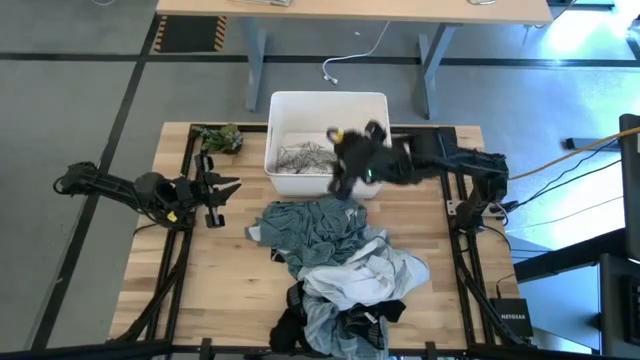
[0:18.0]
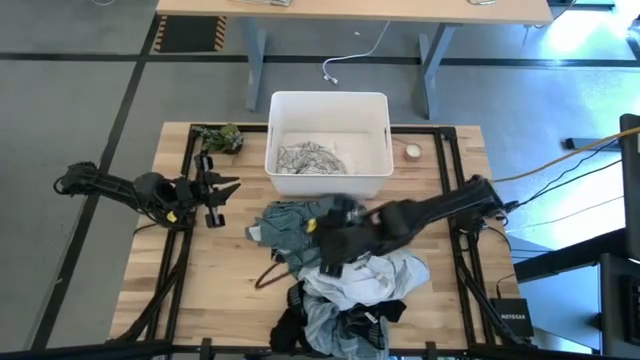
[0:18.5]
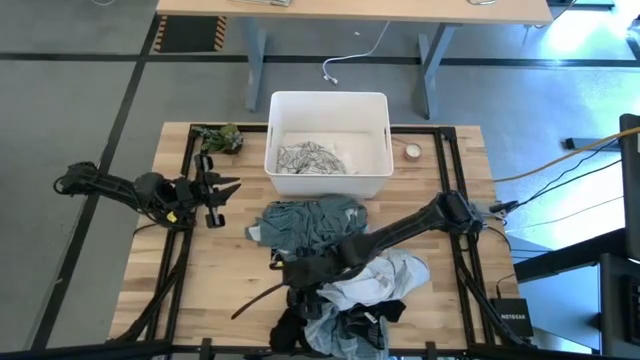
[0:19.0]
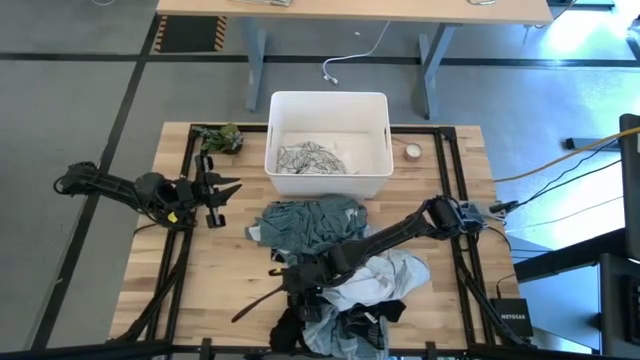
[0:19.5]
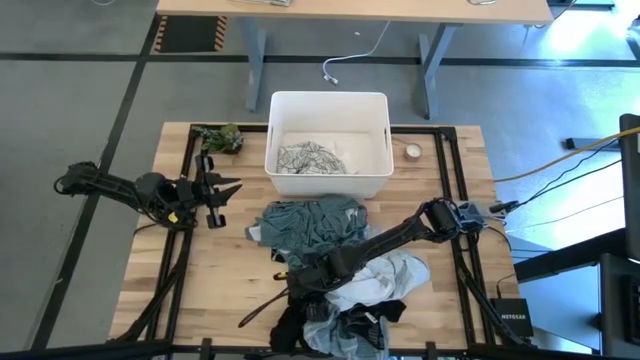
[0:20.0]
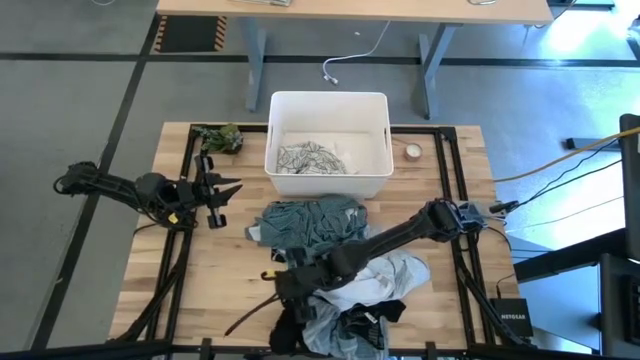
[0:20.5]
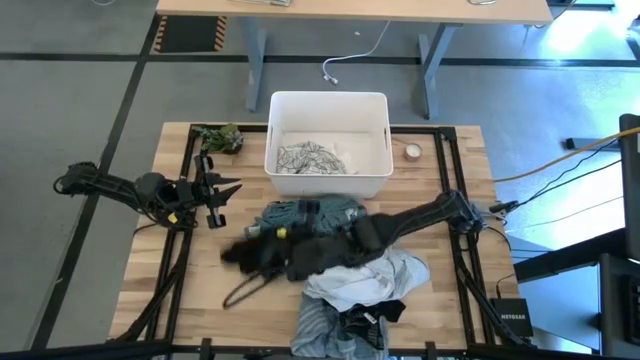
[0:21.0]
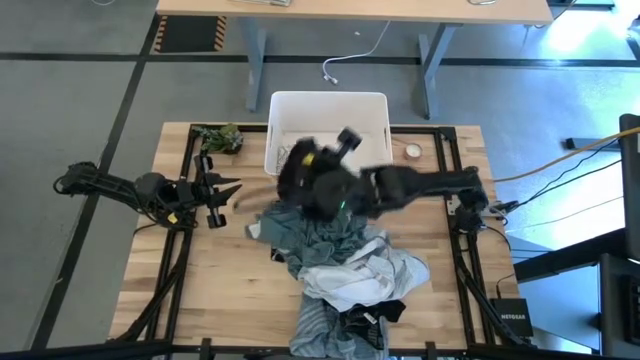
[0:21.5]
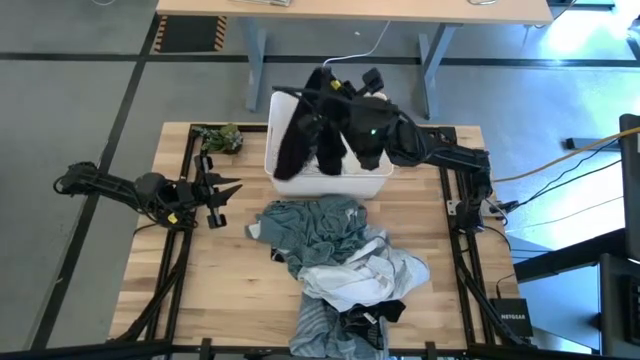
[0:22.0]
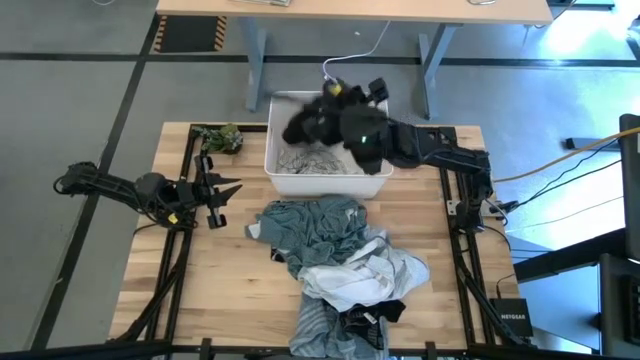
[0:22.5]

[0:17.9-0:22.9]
Task: Sort clothes
Put the black boxer into the white laundry bin

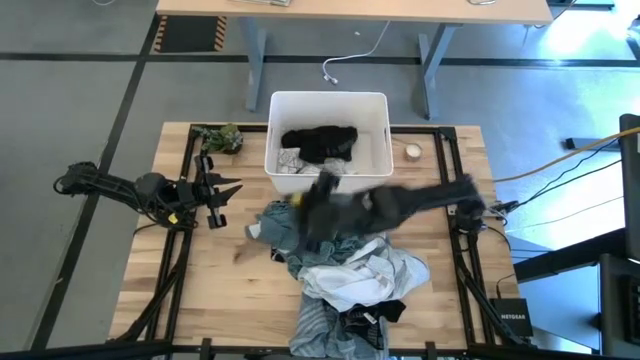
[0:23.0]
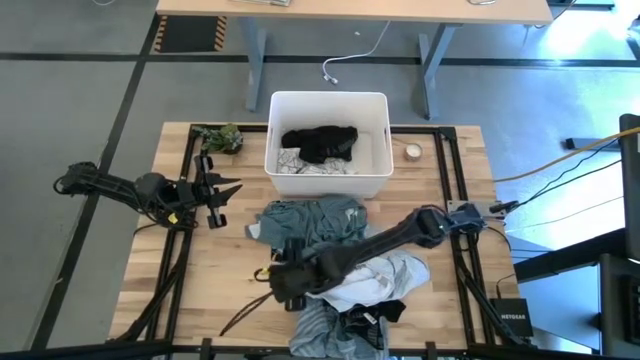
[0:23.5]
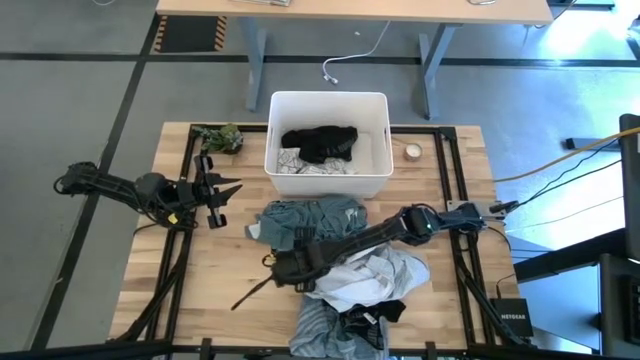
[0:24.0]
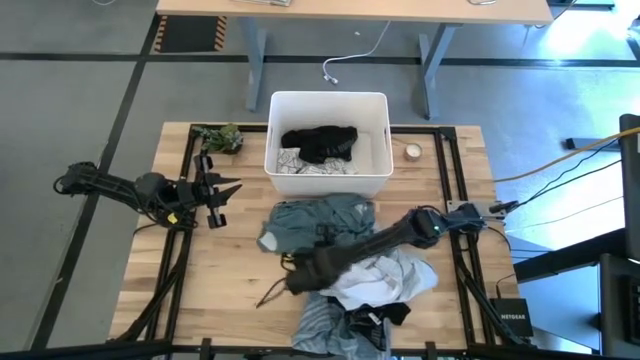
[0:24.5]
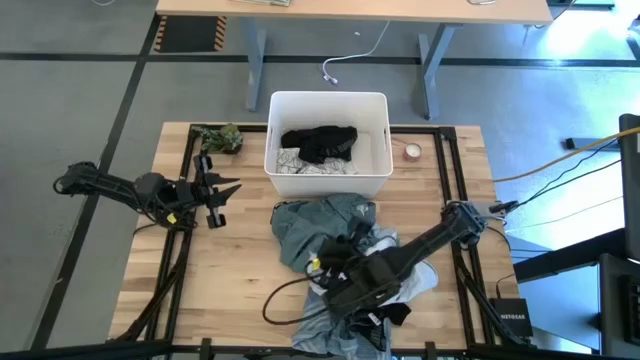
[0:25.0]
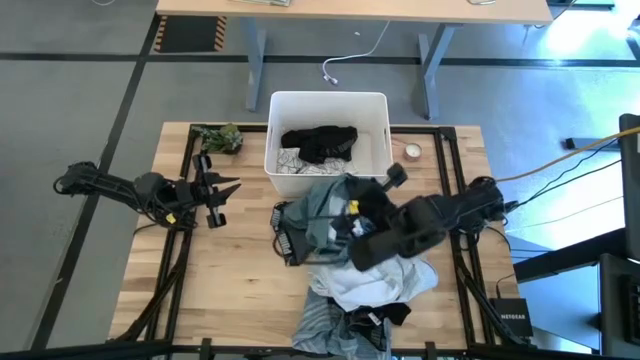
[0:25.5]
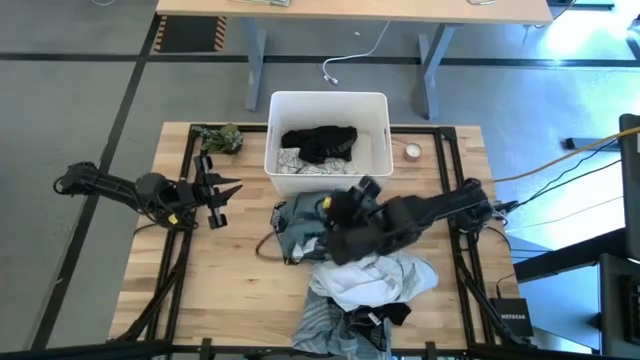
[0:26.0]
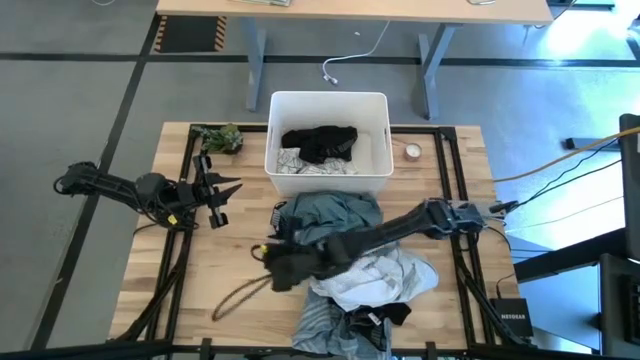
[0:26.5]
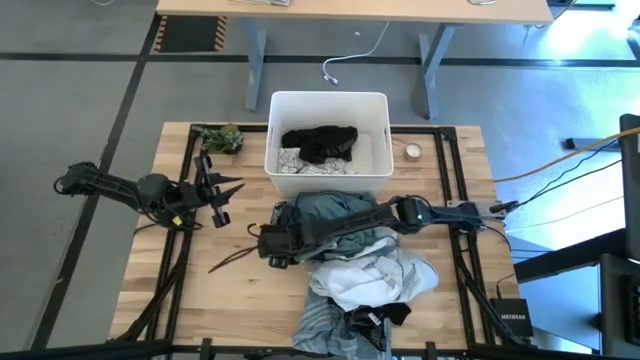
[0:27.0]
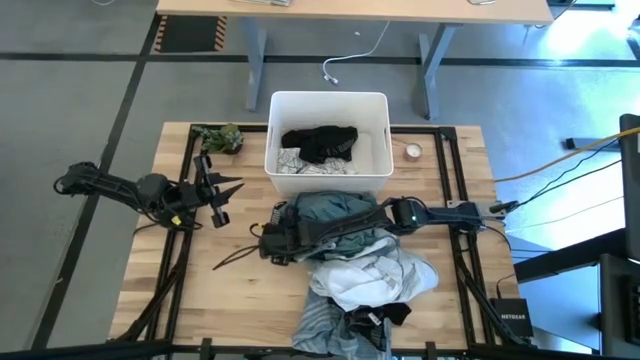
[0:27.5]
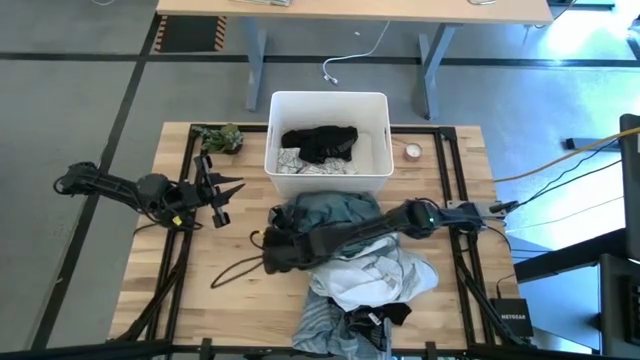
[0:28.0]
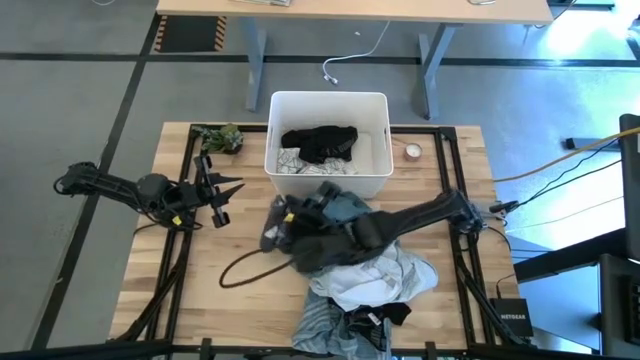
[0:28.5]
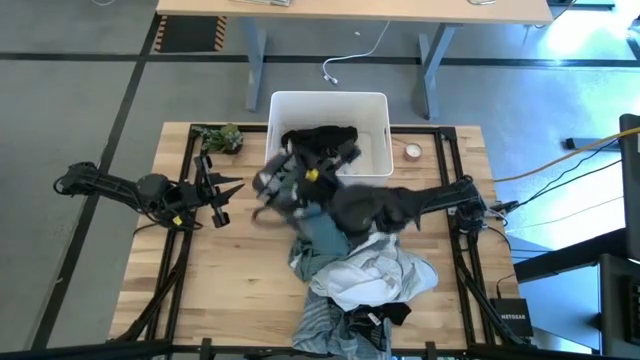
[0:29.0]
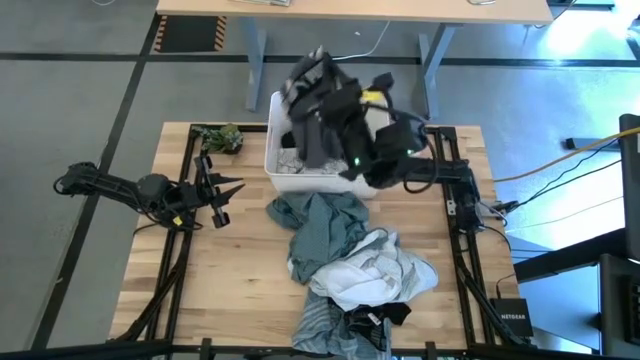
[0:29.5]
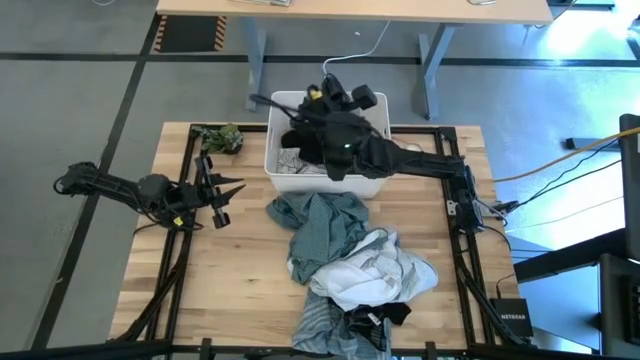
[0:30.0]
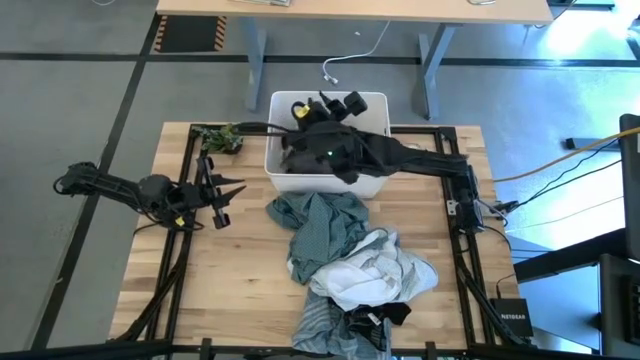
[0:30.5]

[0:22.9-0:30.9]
Put the dark gray boxer into the white laundry bin

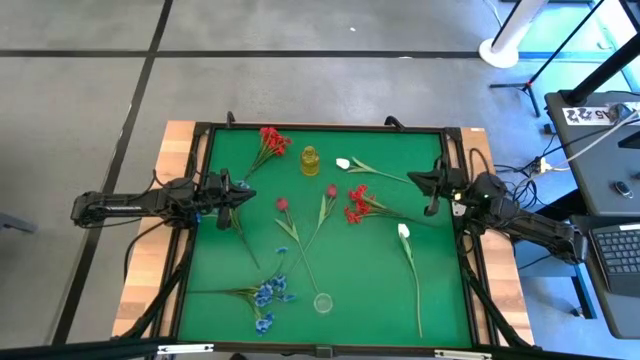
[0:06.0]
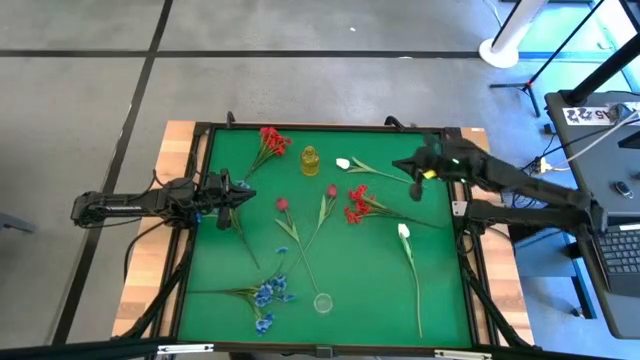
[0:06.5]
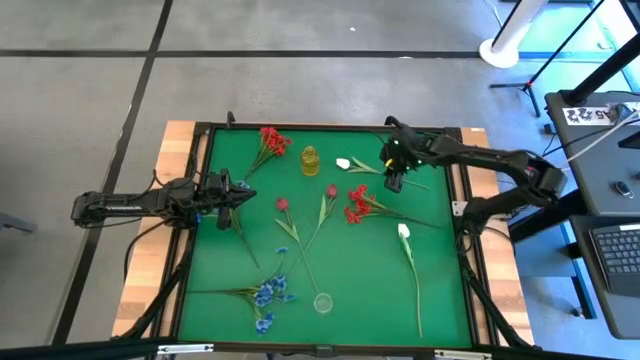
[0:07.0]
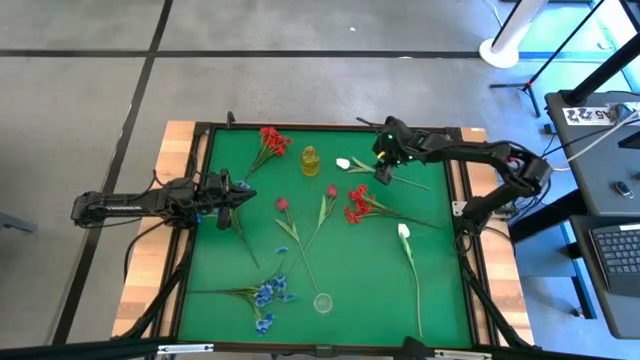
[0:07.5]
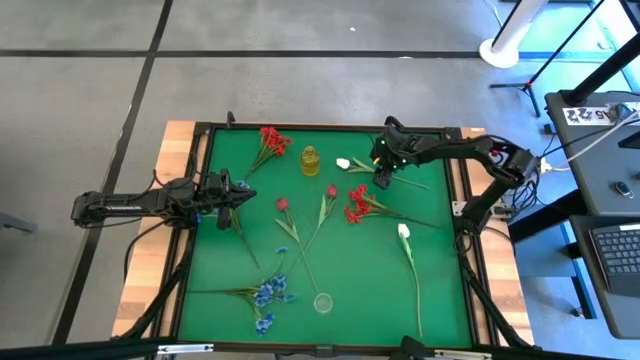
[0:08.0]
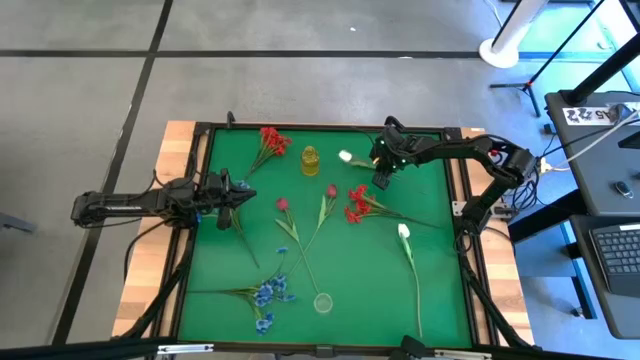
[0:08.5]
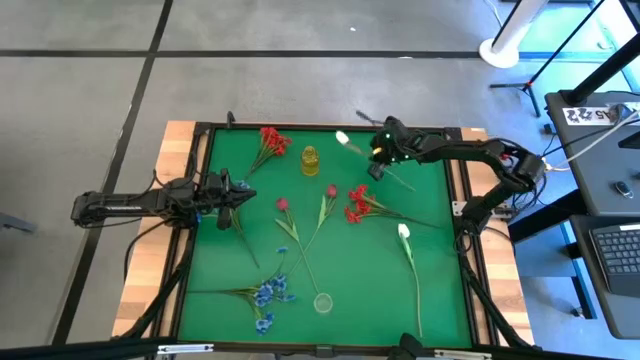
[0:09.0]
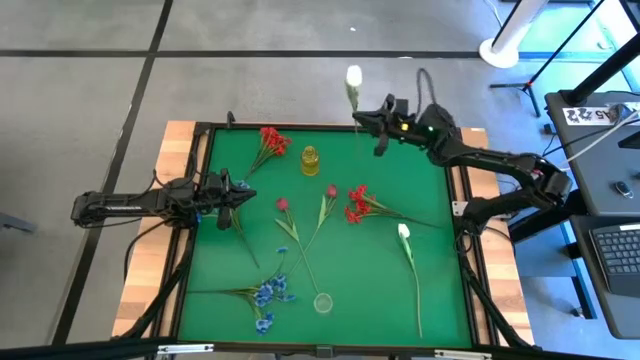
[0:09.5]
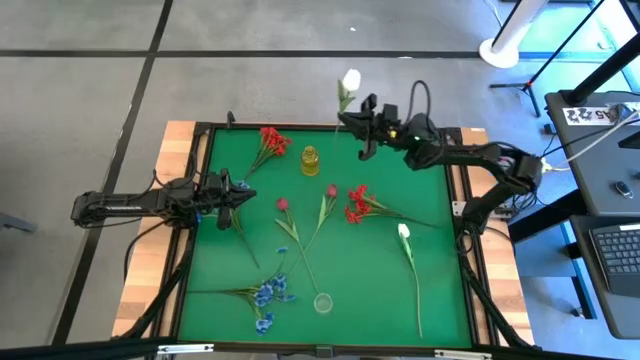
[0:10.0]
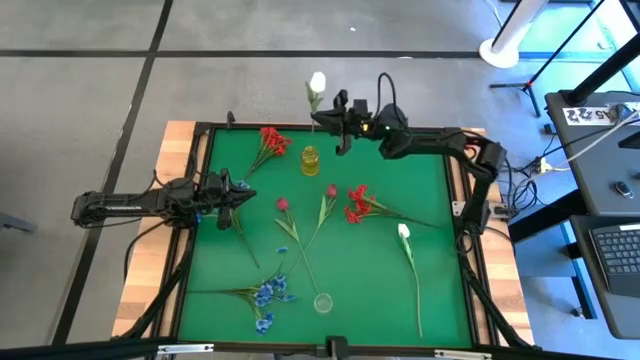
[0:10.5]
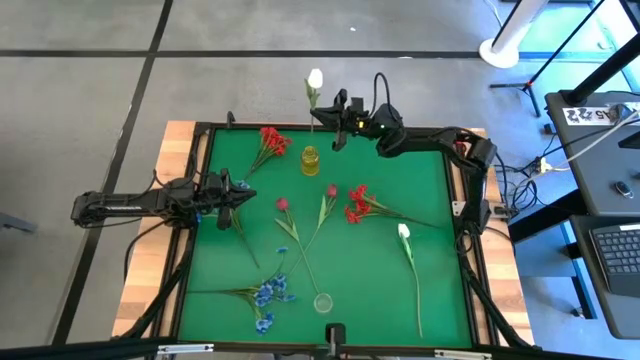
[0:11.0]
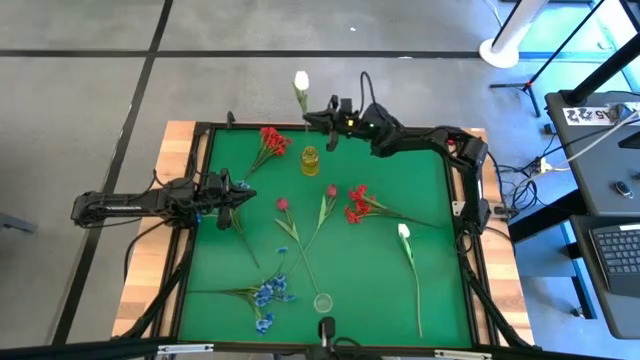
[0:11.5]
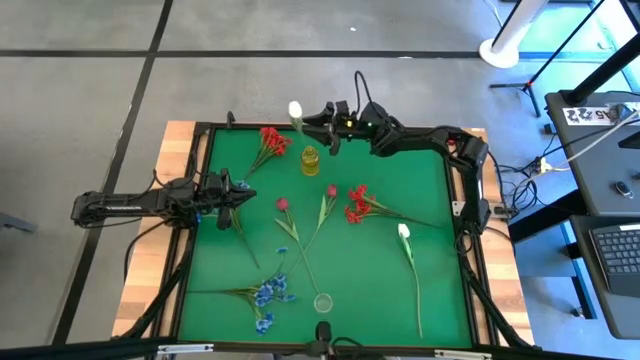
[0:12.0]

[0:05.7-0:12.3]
Task: Sort flowers into vase by color
Put the top white flower into the yellow vase
